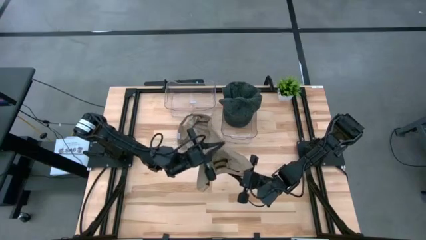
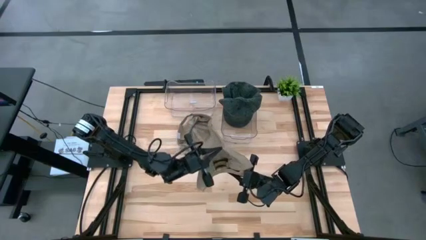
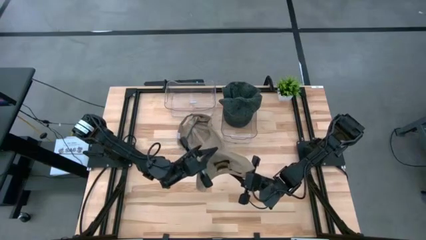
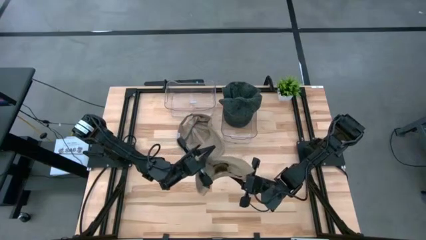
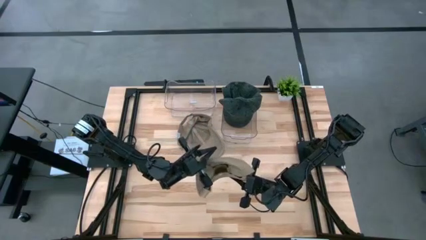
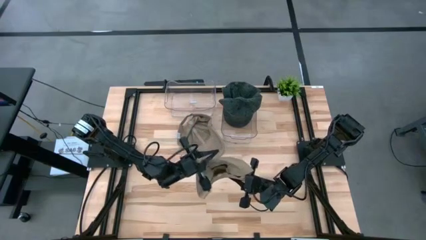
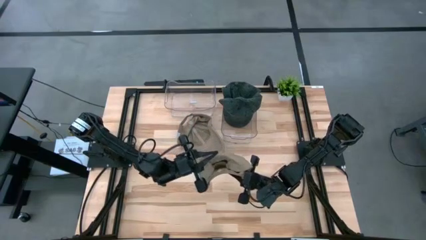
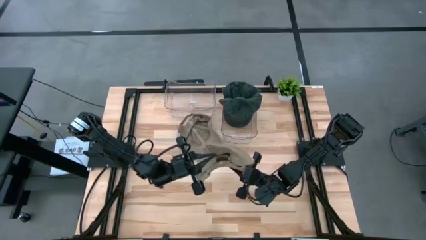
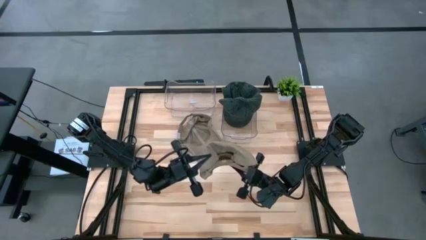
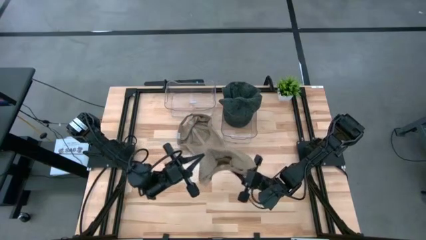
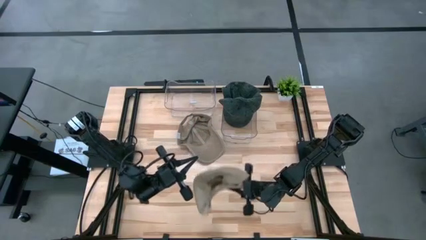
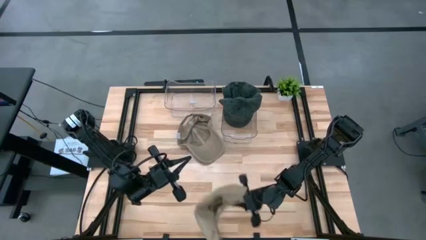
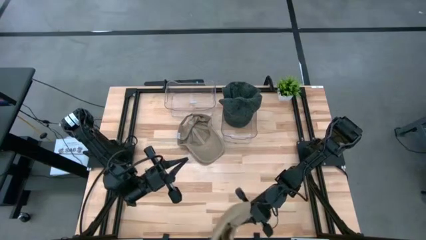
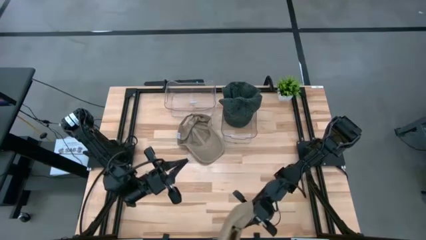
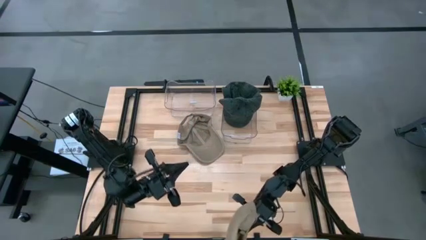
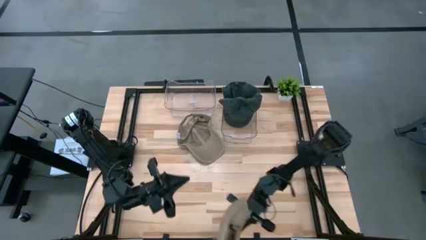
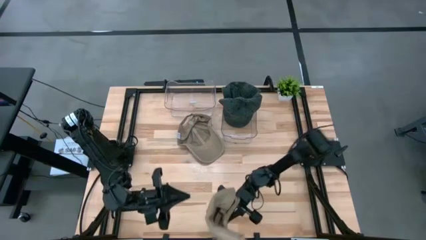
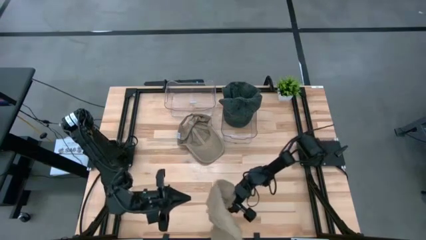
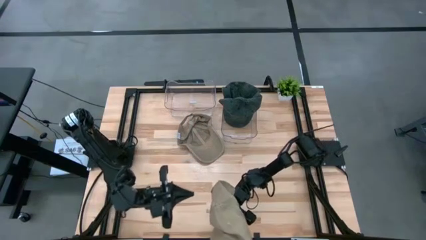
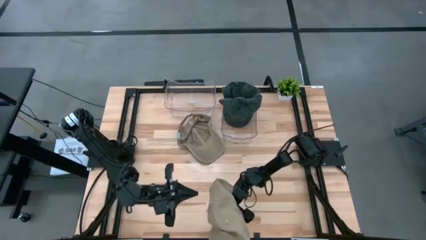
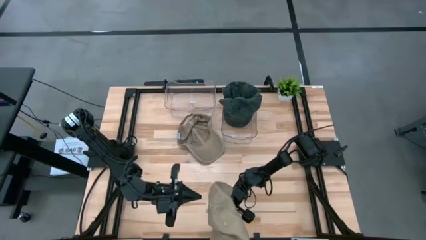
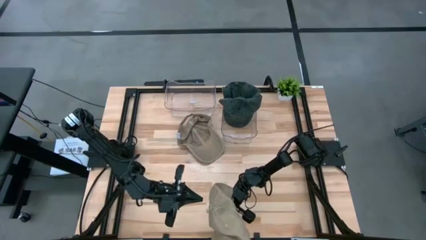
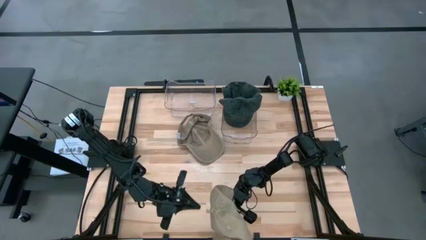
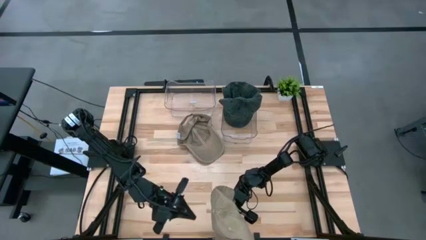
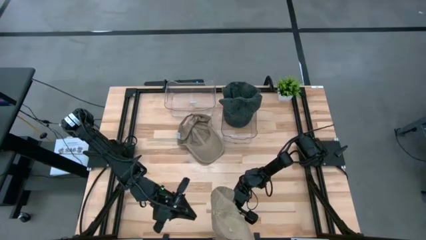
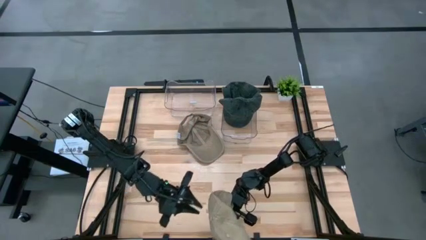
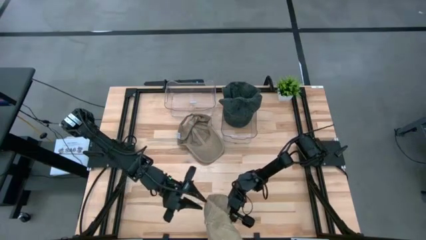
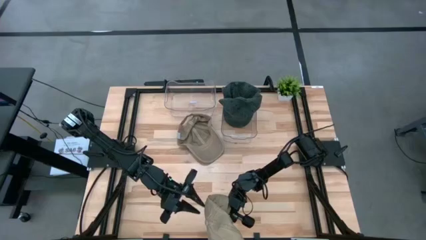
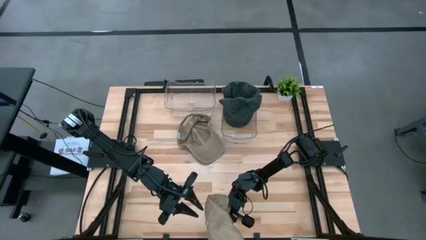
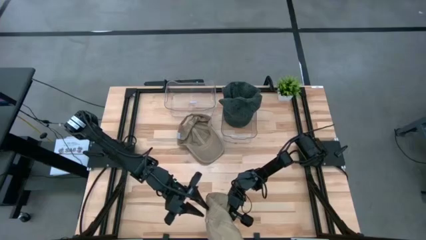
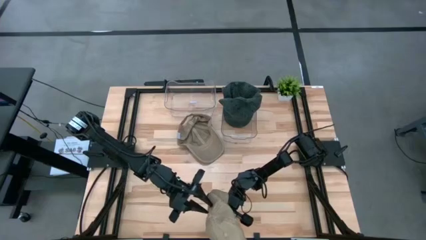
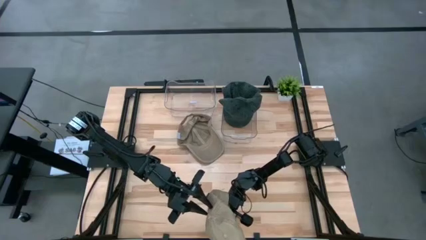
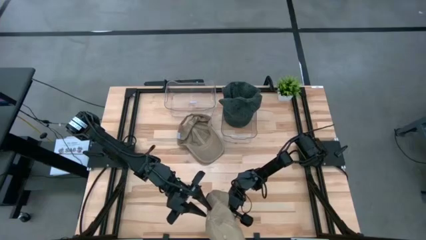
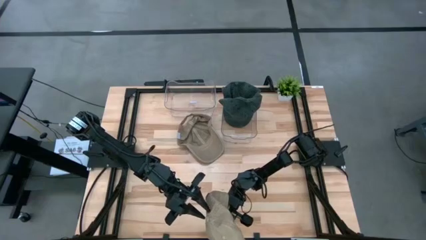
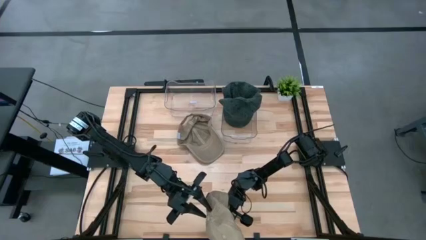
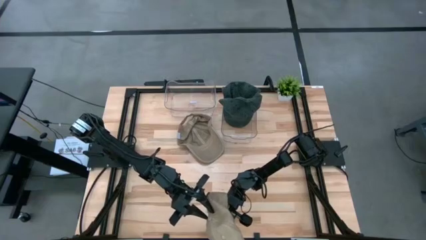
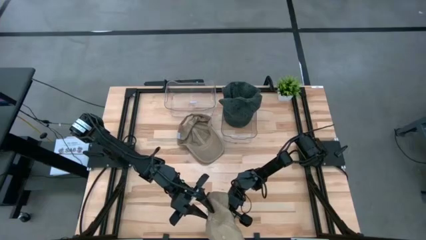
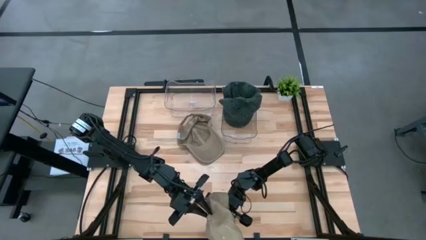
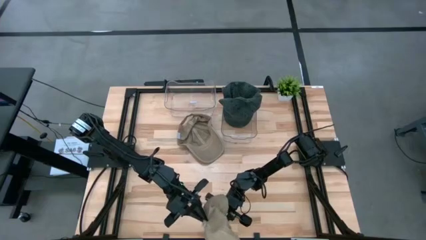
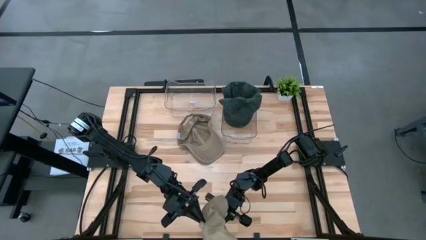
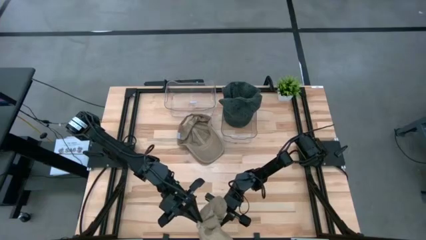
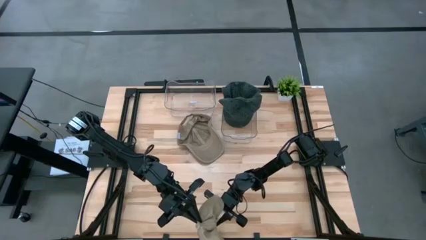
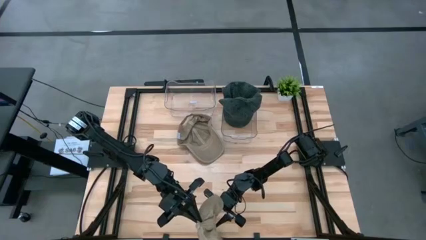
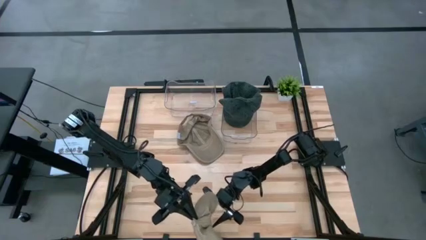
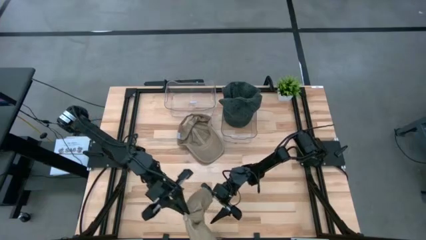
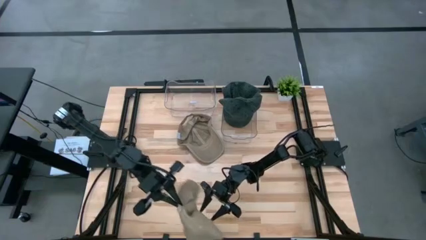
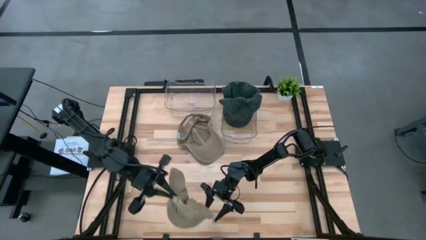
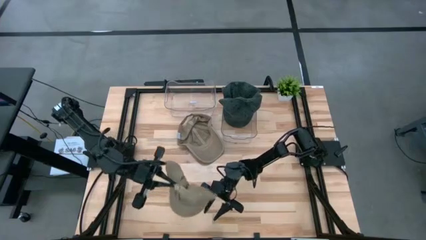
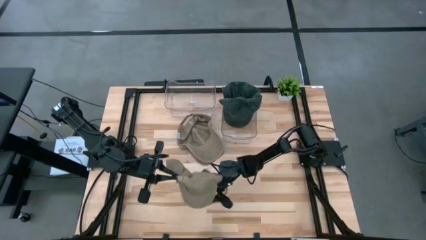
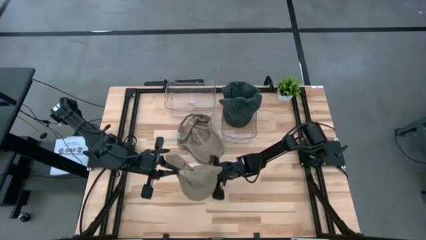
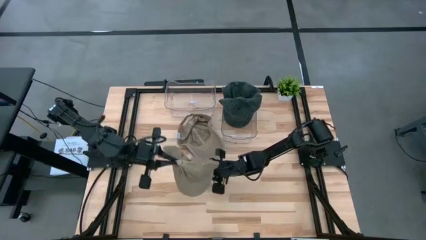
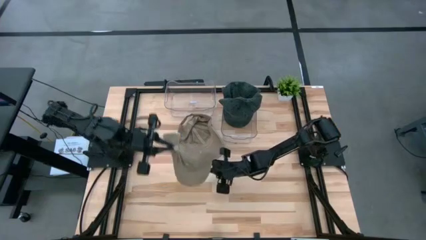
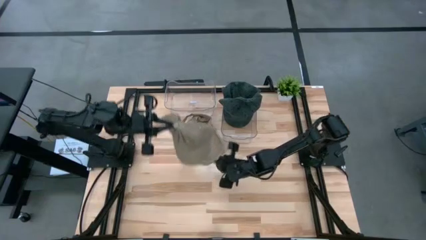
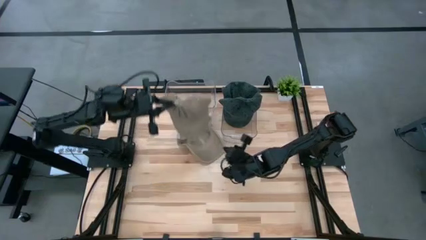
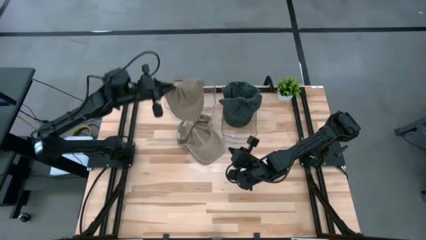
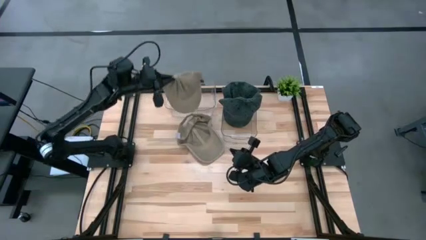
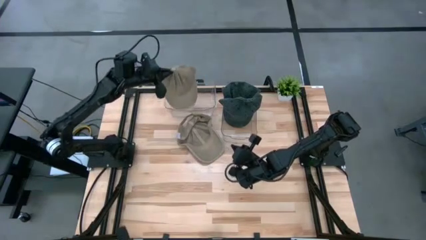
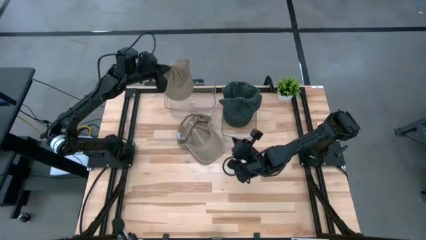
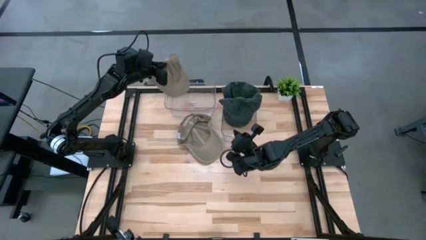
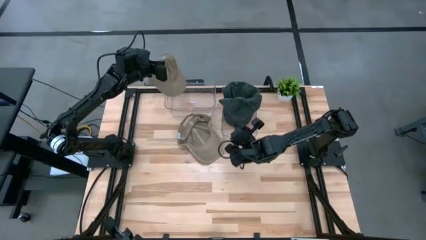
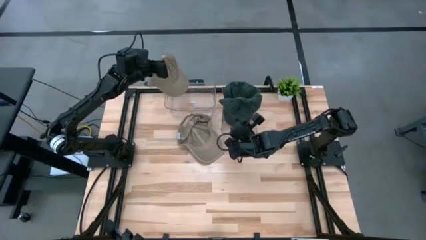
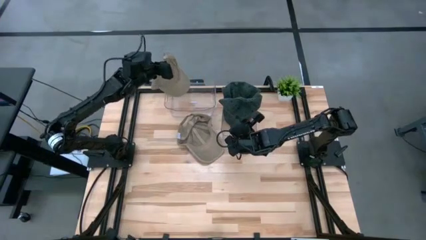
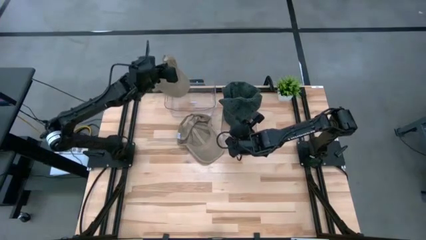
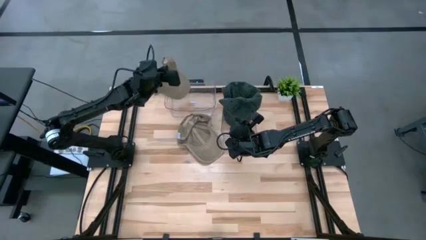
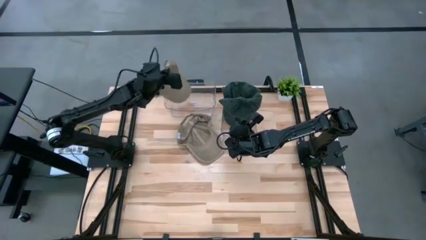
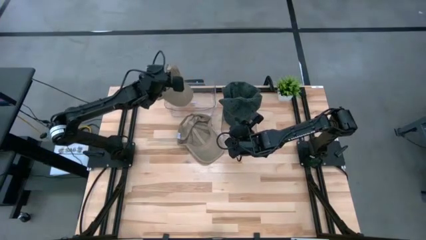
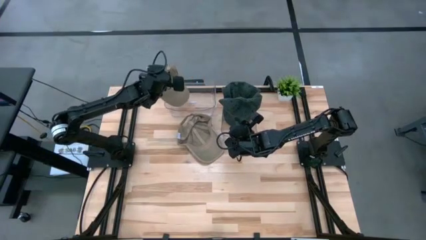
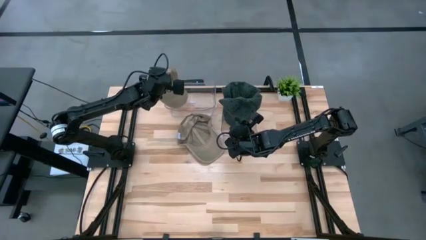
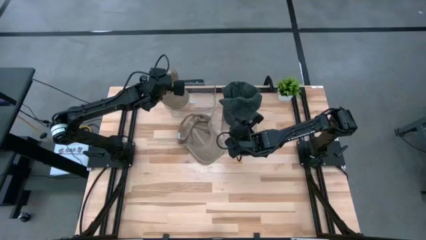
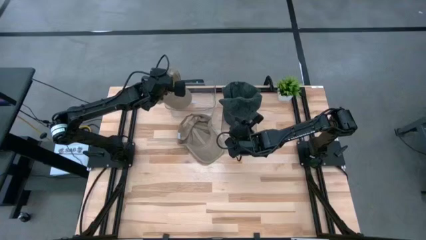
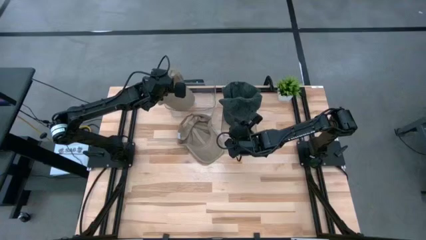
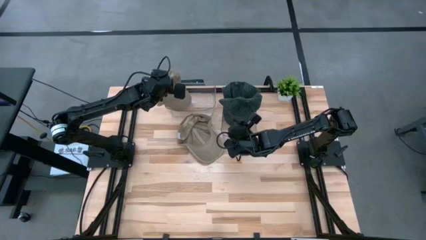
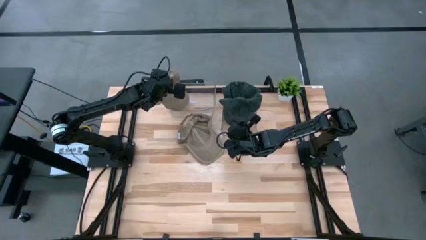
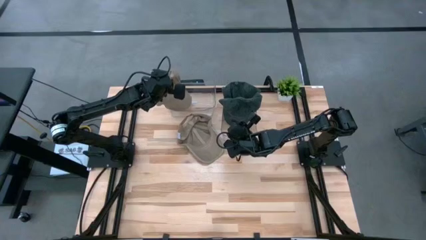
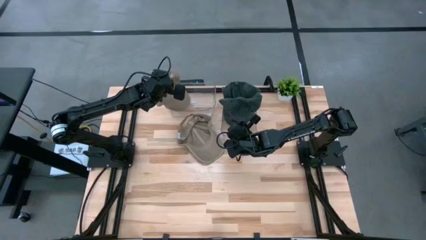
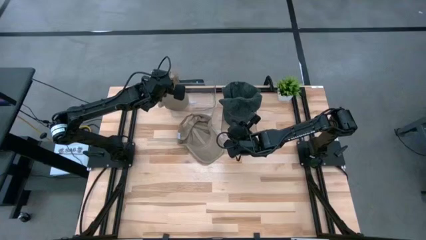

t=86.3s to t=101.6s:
Task: Pick & Place hat
Put the bottom brown cap into the left transparent bin
